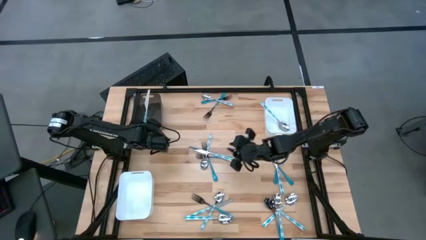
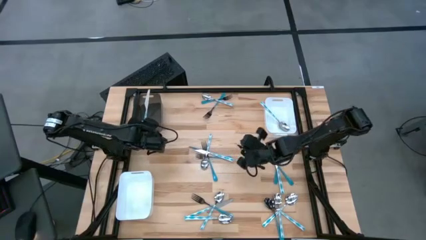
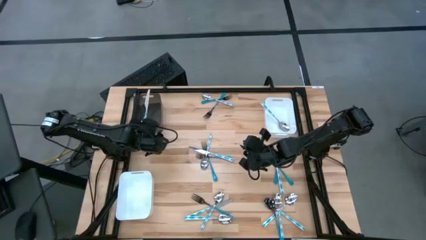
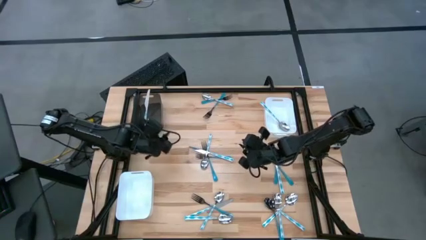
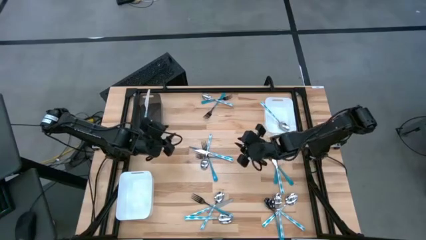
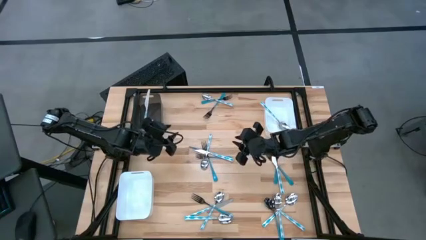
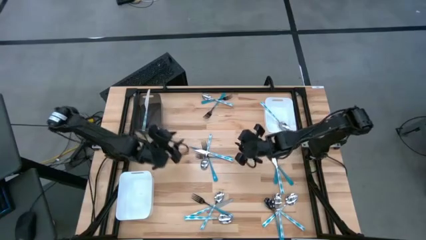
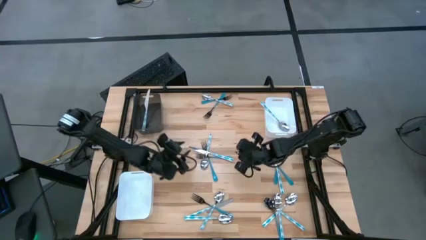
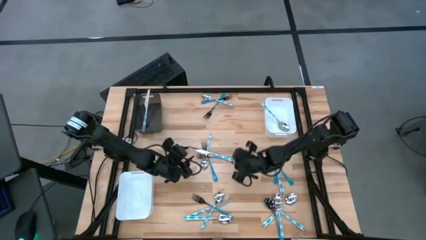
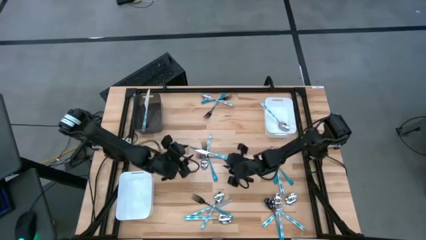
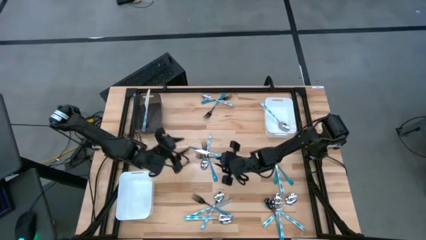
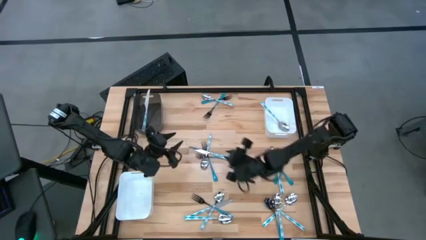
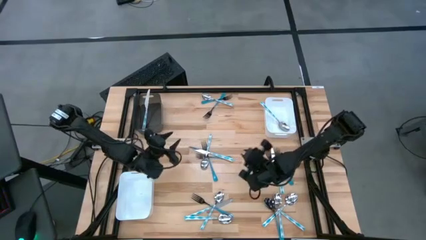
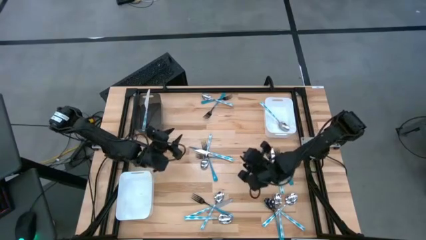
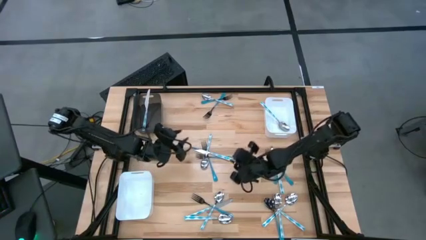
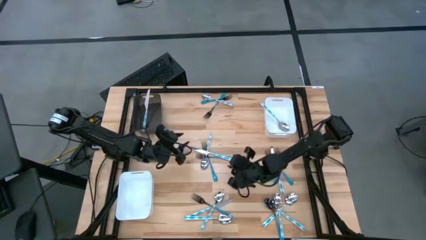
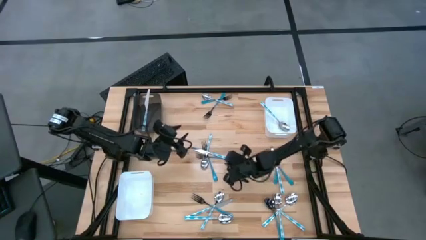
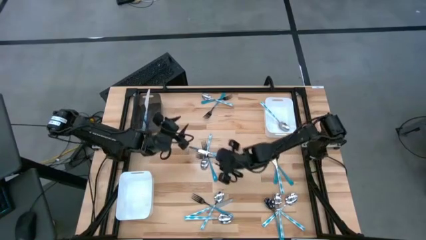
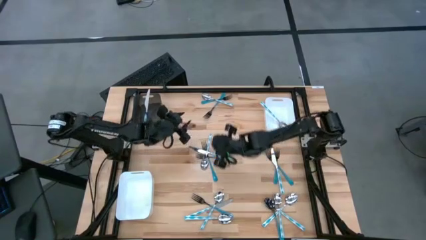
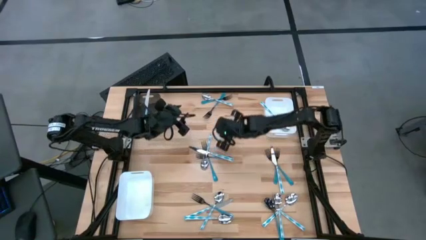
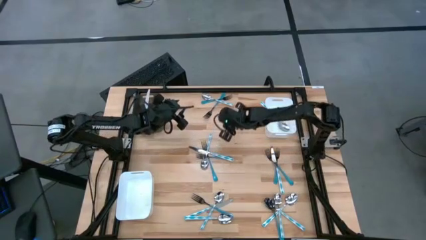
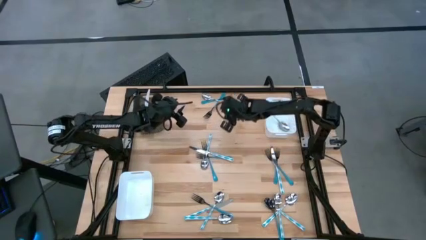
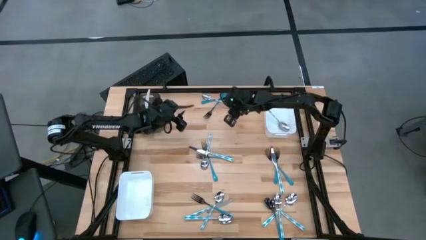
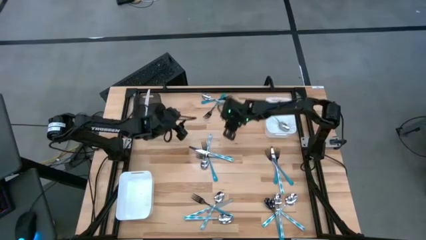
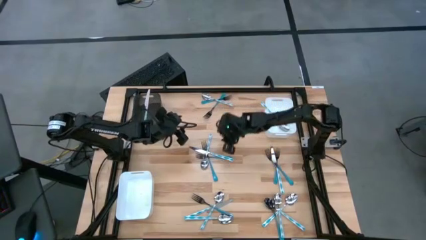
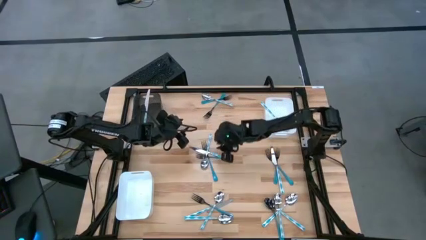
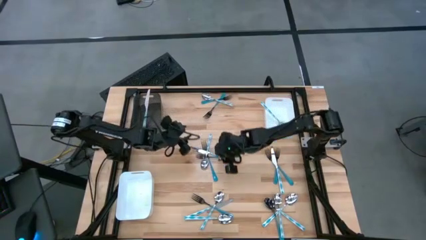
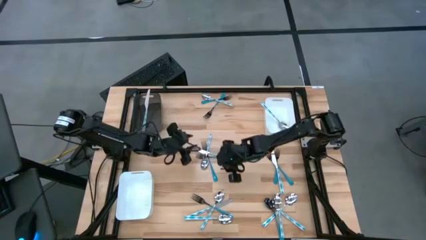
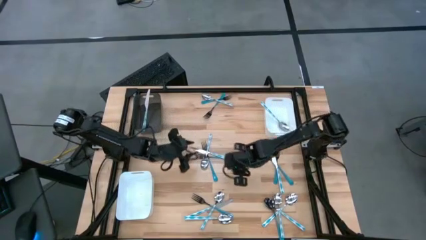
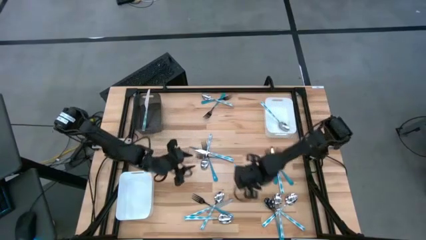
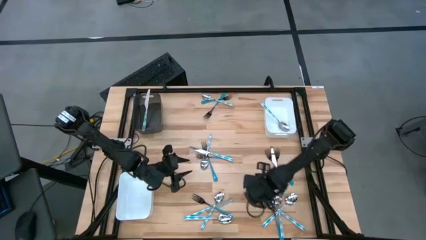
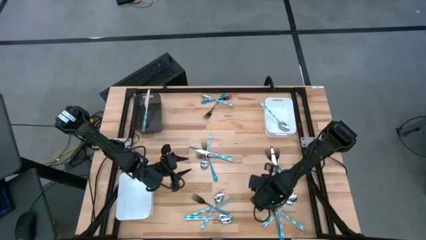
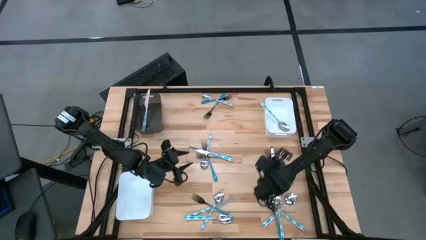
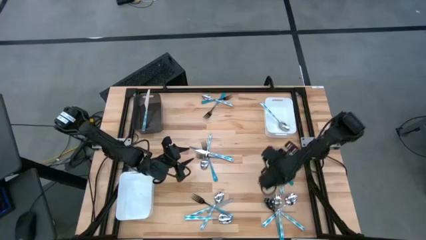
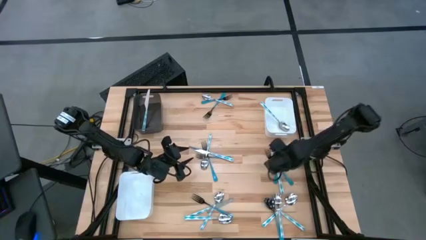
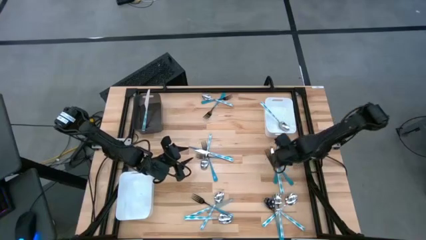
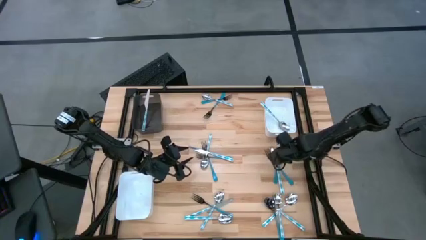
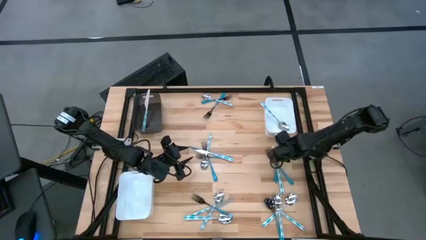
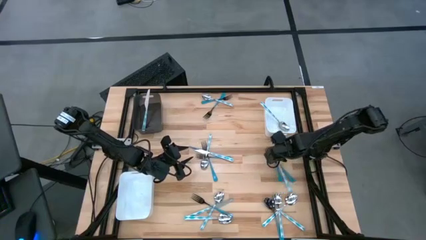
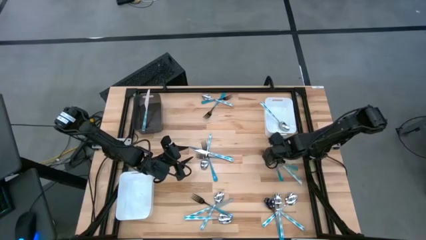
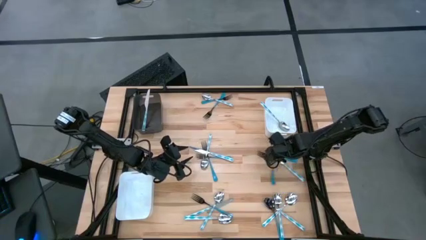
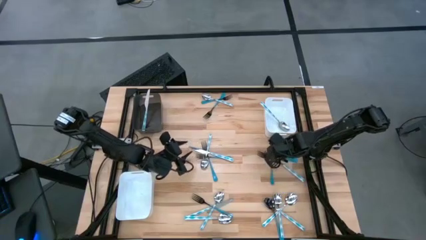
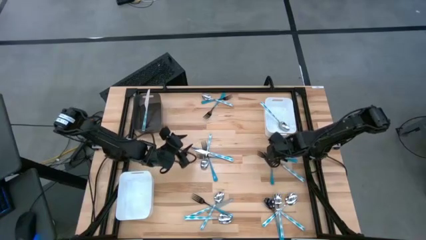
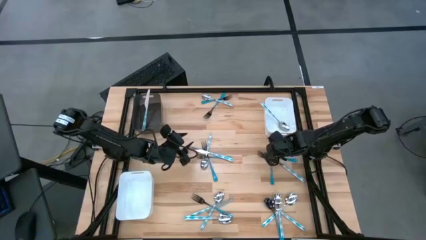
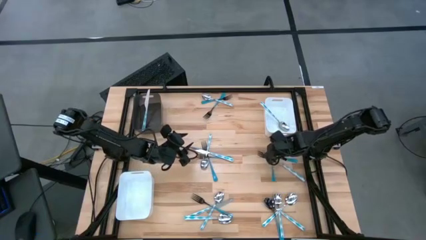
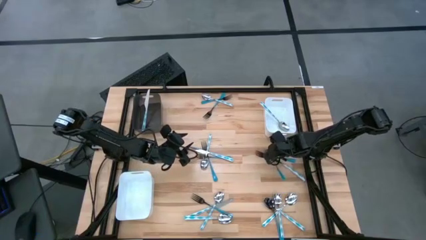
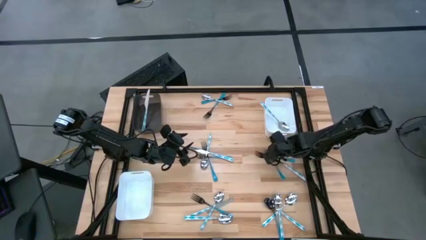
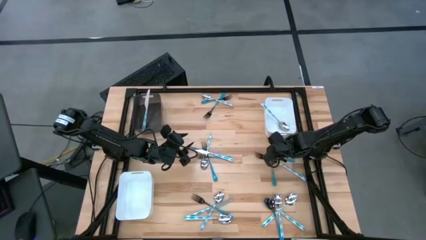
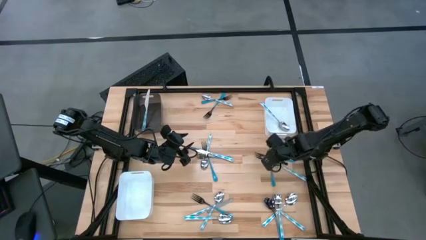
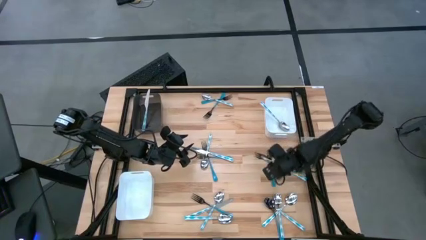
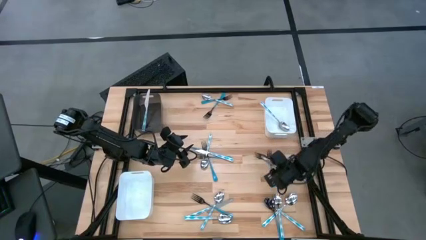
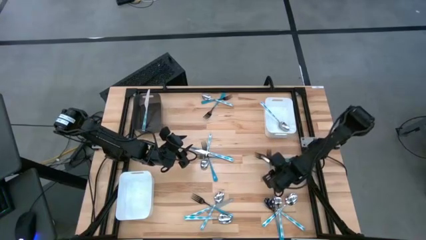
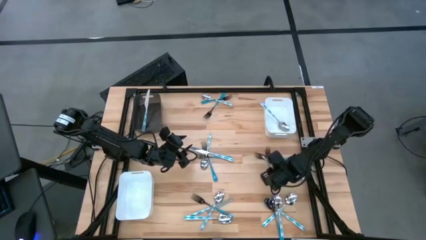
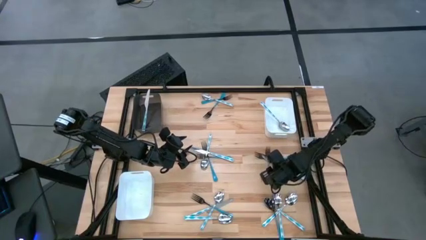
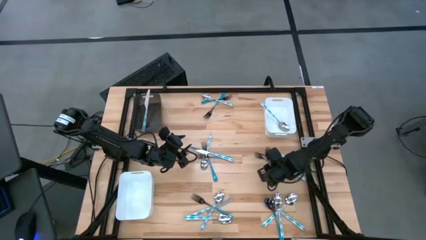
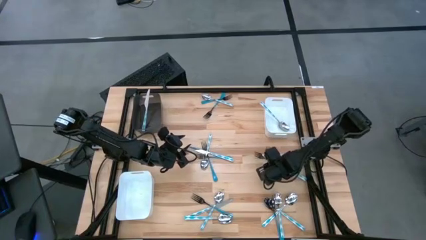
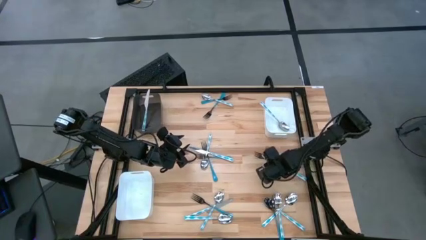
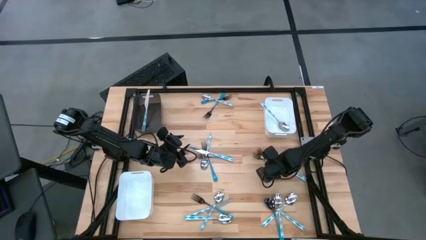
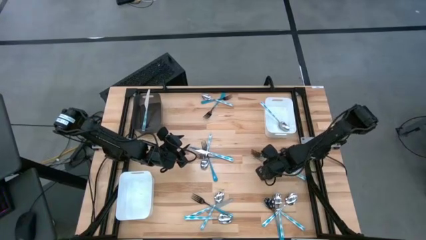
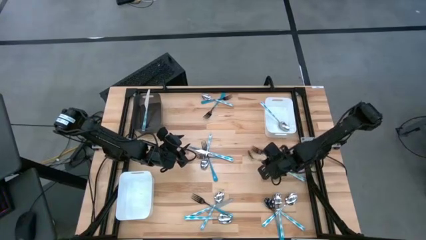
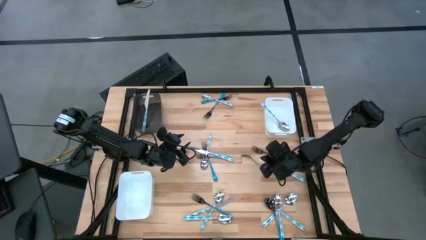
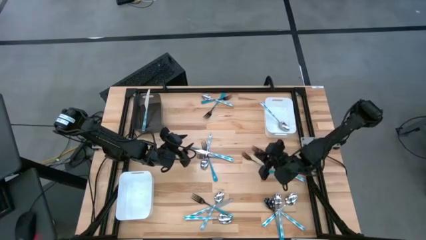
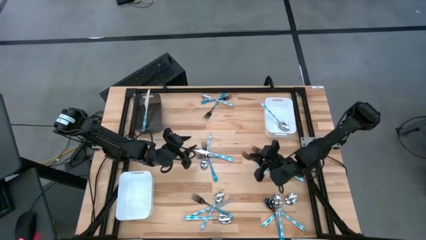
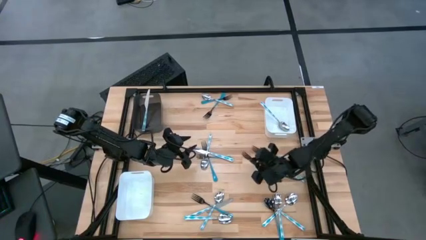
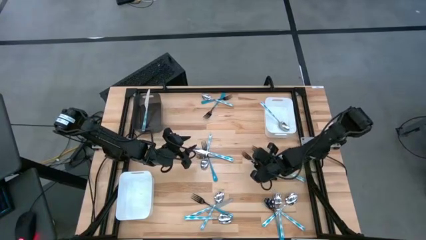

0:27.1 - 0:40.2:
Task: Sort silverware by color (type)
Put the blue fork into the left white bin

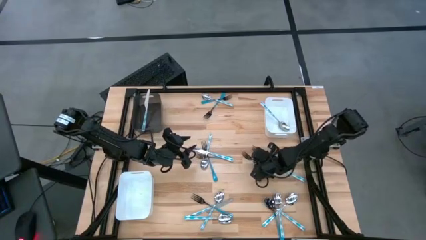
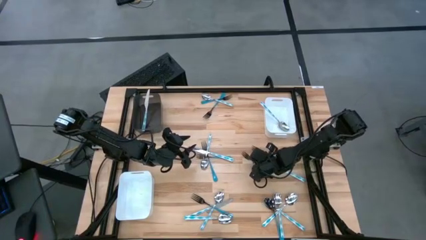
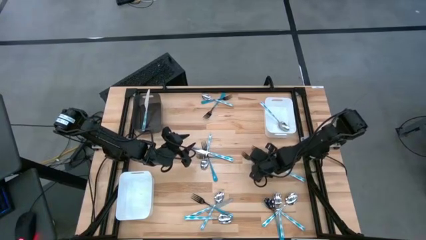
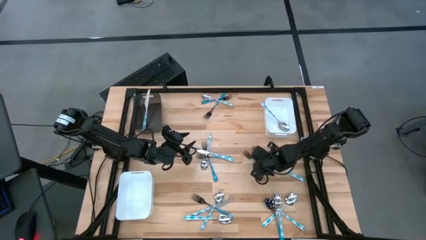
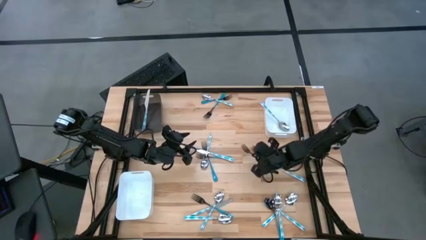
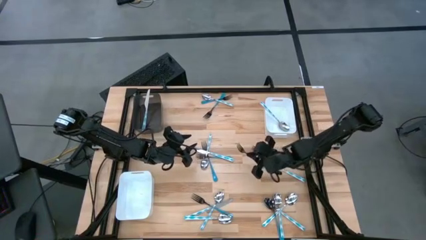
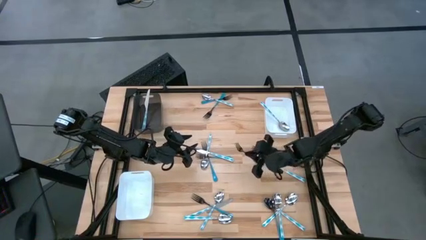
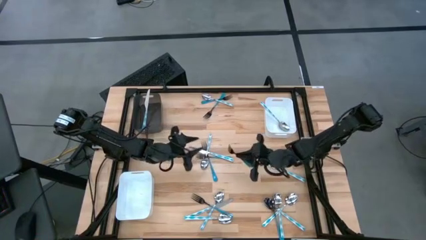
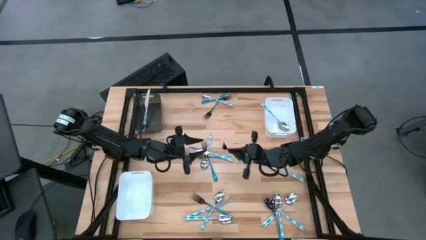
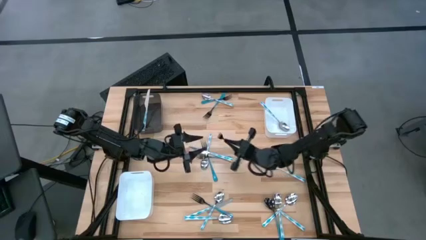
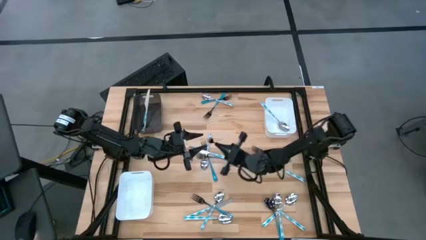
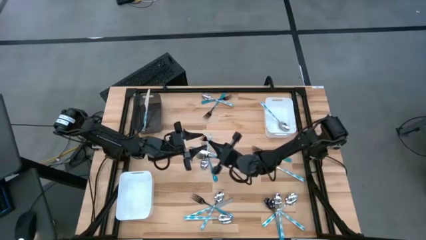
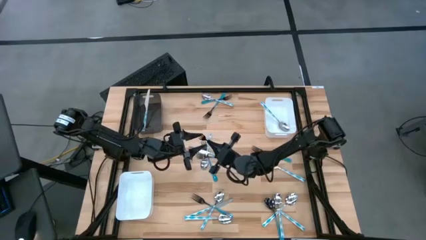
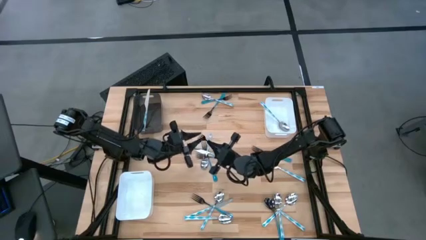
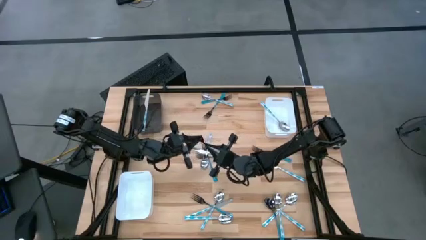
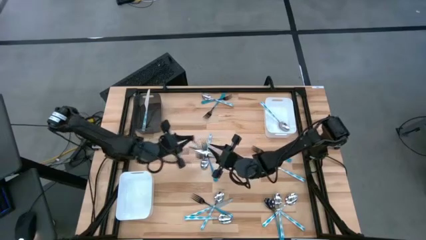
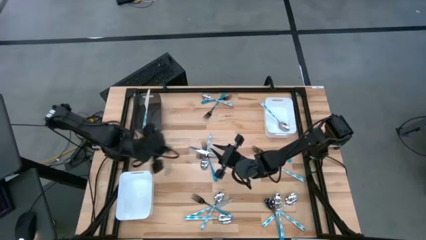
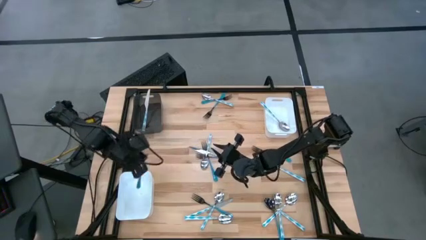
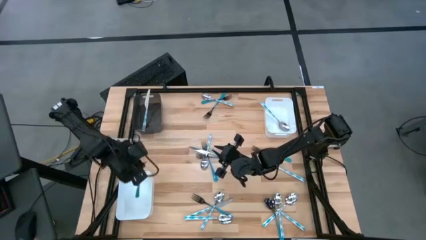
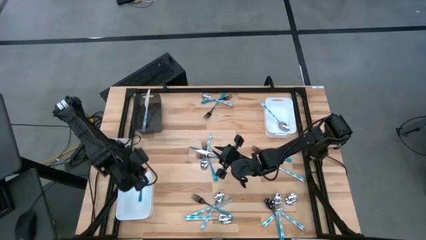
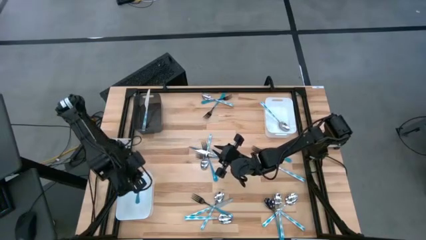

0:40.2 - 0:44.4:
Put the blue fork into the left white bin
